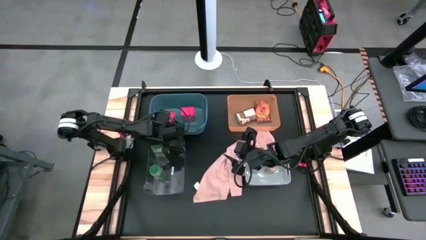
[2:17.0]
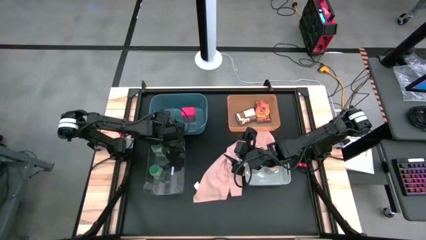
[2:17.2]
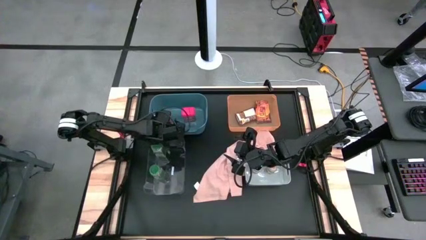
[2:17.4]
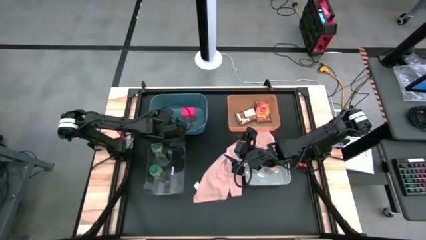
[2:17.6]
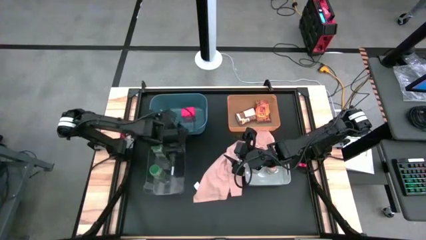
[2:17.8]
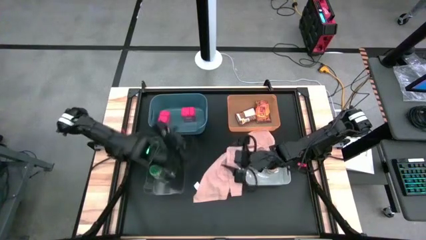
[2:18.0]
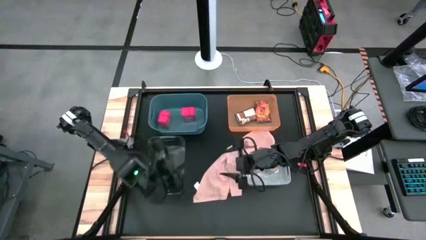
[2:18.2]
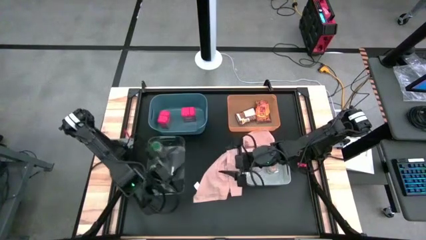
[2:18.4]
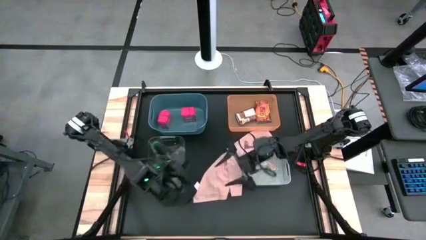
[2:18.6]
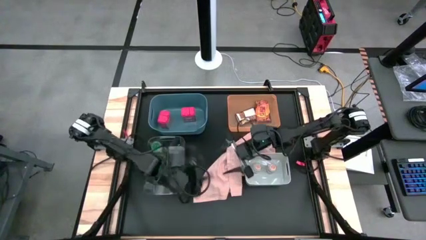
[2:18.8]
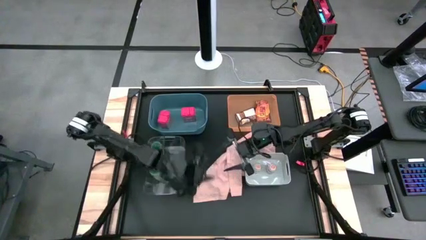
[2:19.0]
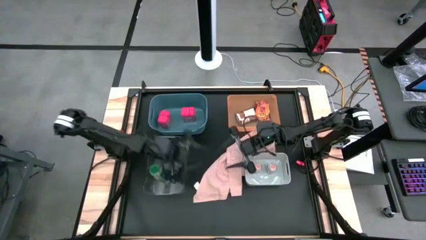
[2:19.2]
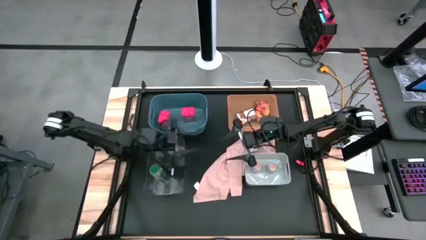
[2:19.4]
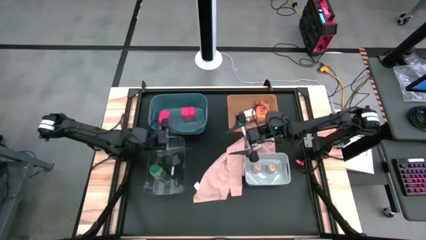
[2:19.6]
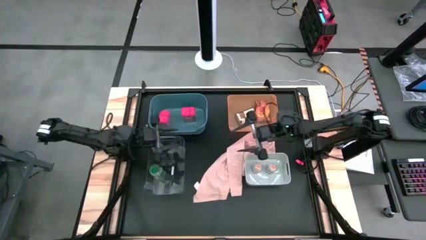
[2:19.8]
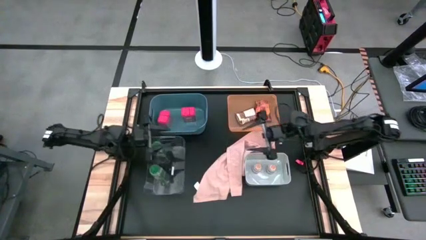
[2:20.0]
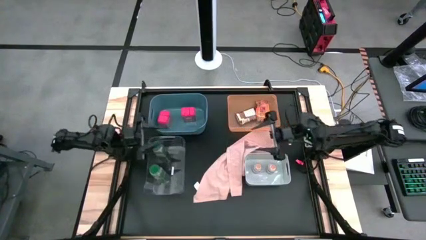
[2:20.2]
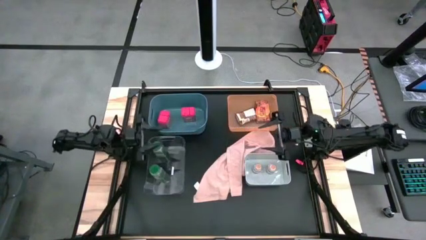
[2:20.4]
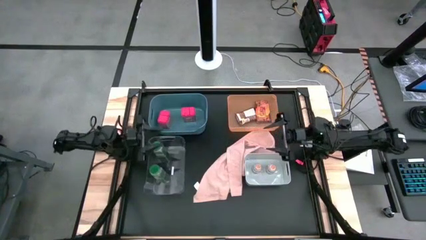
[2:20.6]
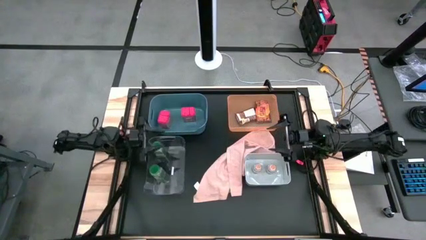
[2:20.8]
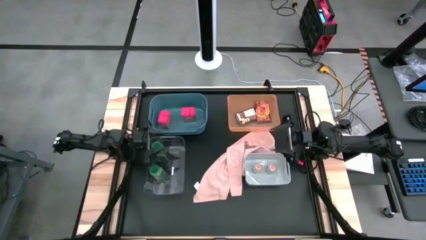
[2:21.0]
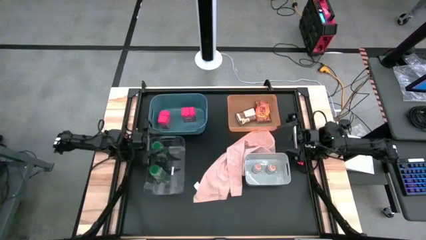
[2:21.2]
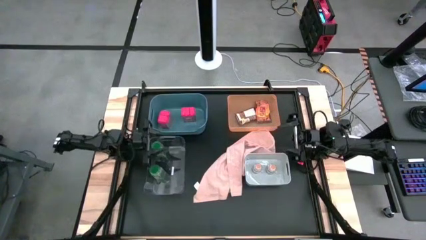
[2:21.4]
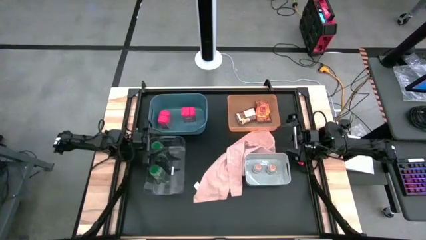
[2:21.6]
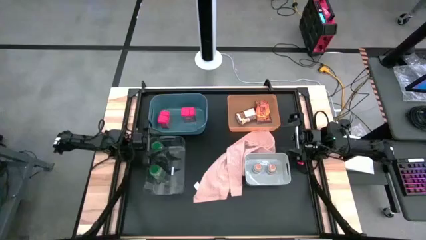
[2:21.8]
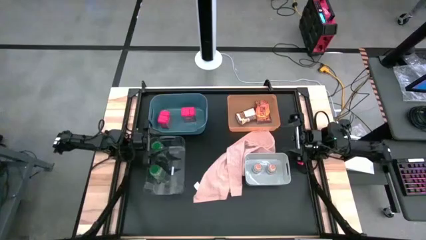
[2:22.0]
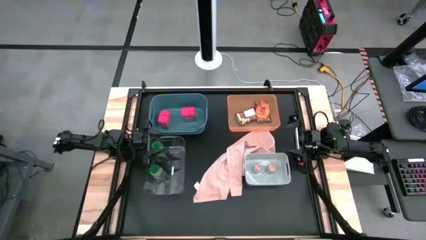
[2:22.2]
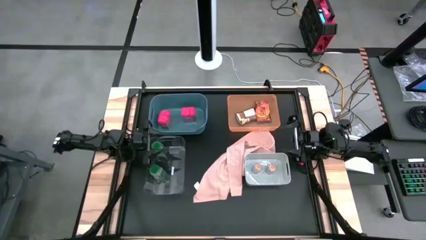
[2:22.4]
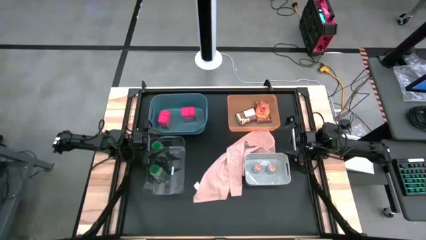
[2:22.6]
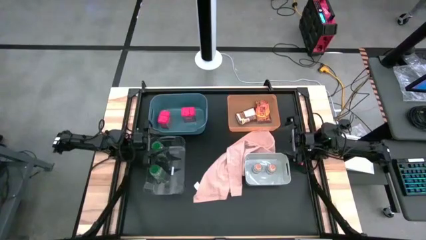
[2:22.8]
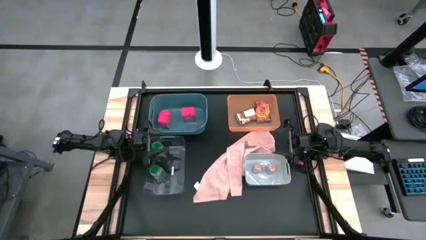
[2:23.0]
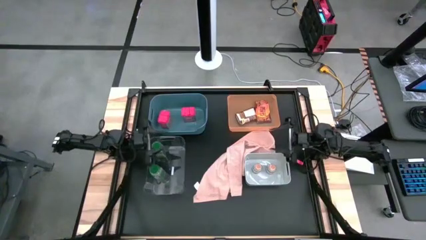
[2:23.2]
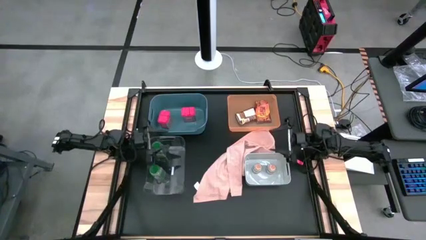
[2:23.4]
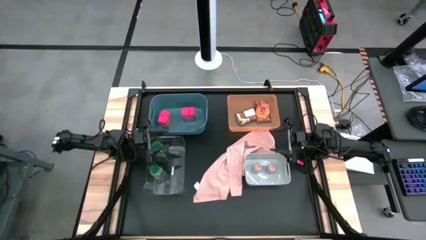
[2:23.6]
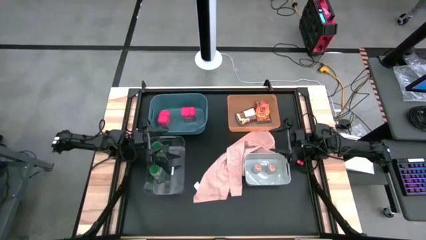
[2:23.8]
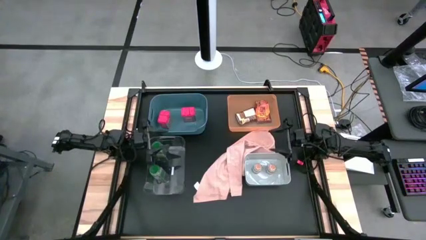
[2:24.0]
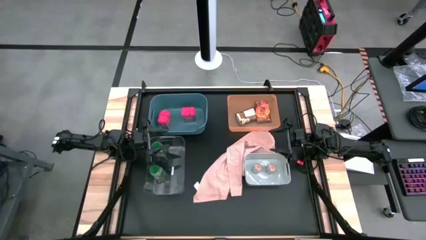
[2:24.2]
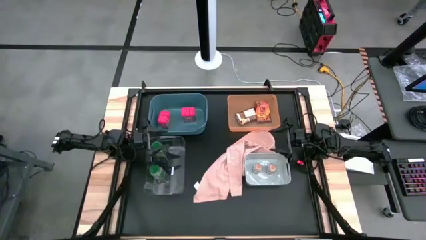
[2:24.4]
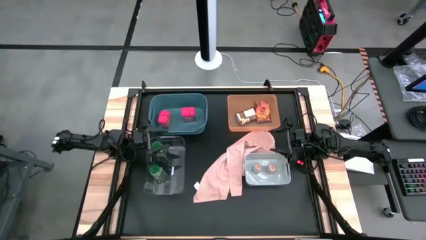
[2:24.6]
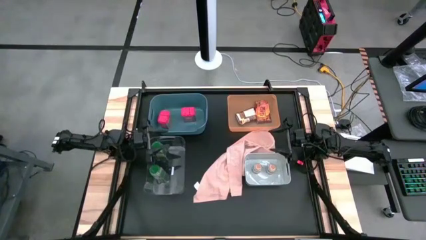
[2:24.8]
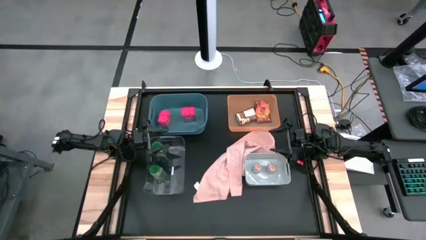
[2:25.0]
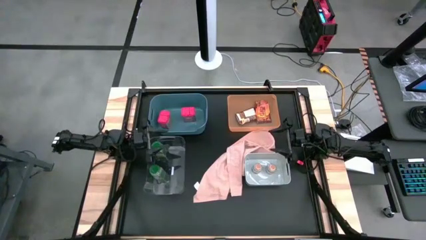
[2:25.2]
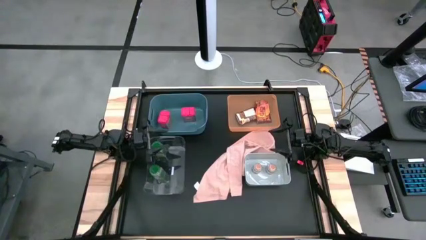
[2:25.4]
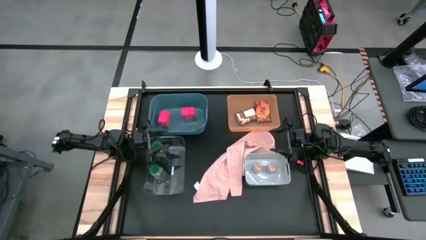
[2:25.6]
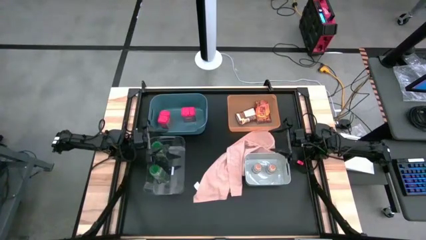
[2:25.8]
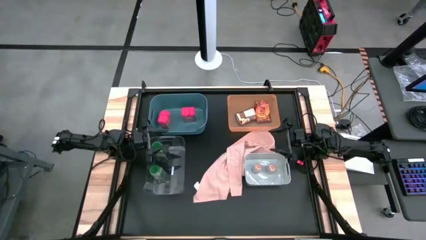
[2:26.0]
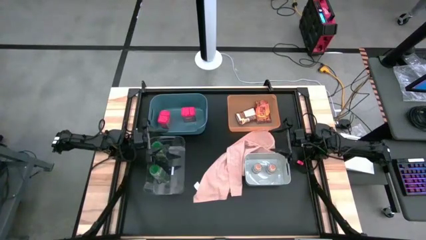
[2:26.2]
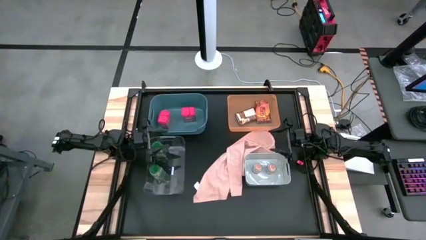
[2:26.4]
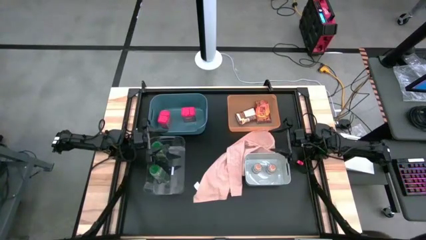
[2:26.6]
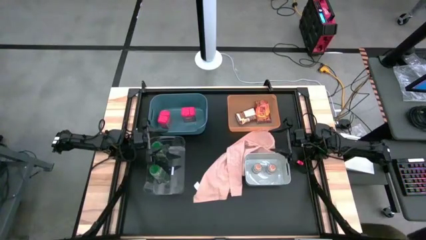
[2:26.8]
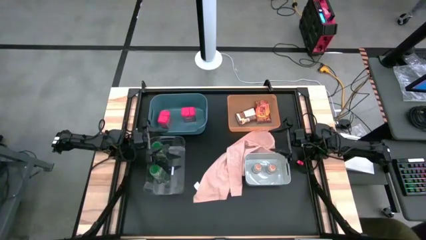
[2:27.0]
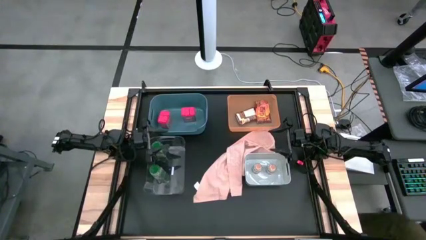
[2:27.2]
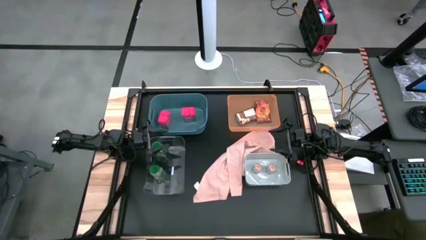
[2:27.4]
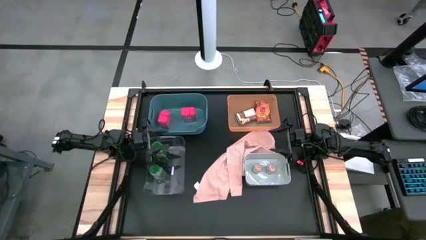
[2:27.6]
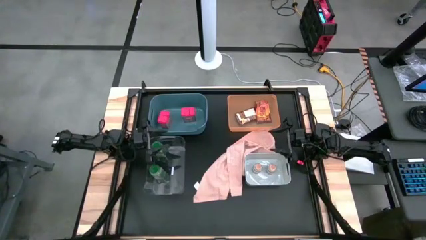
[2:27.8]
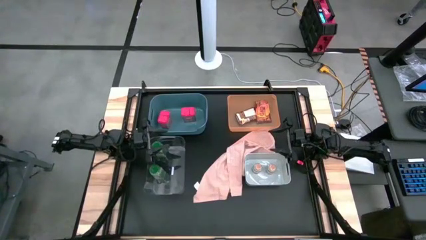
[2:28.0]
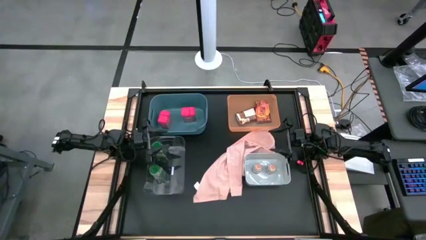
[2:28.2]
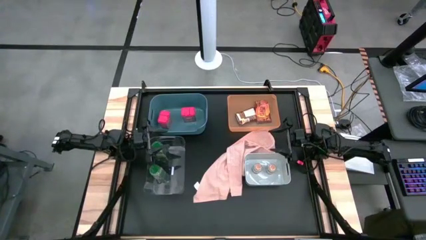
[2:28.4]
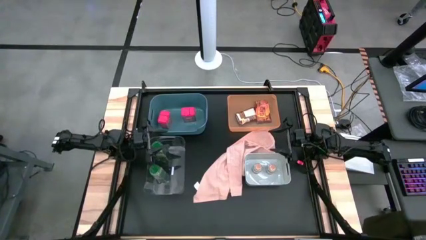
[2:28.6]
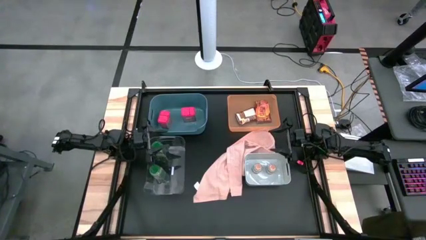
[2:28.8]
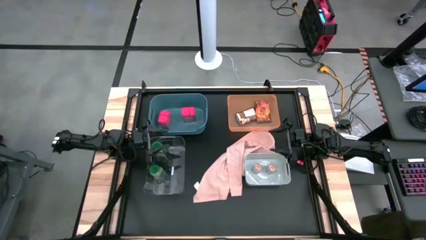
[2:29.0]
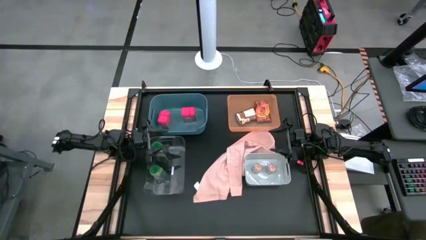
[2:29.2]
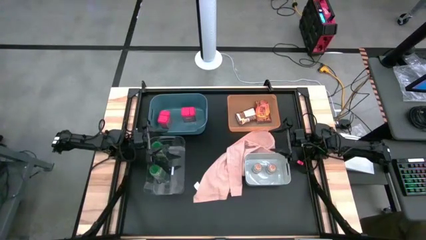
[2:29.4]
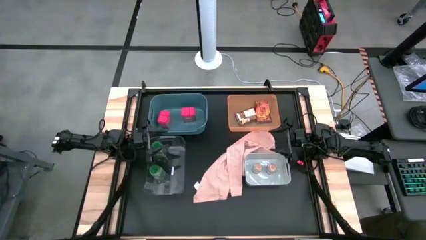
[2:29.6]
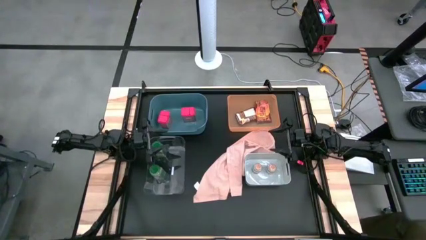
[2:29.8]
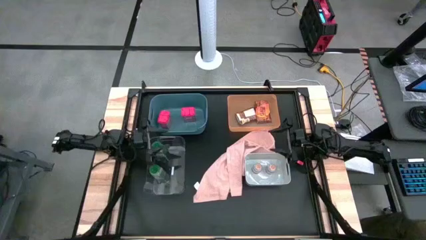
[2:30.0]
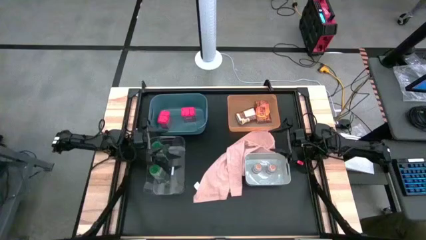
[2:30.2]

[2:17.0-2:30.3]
Task: Sort spices by type
Return to Home Position

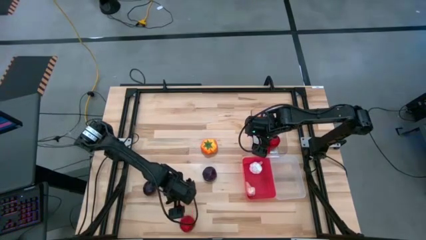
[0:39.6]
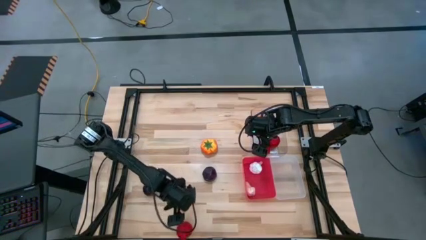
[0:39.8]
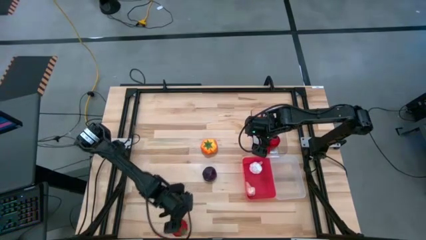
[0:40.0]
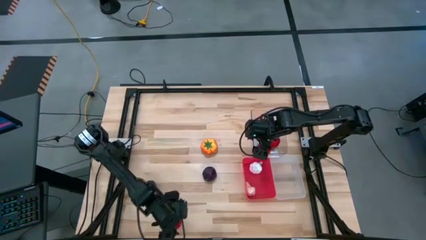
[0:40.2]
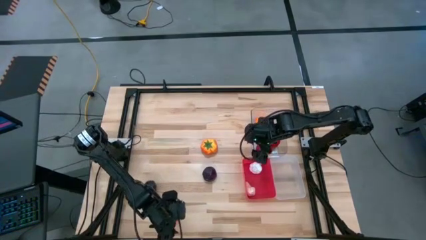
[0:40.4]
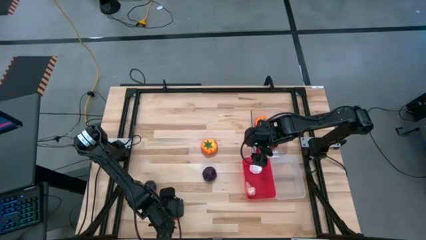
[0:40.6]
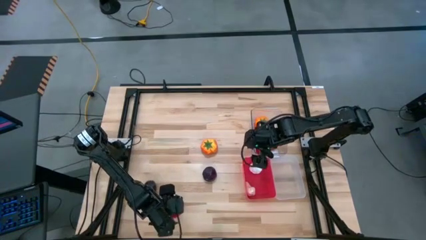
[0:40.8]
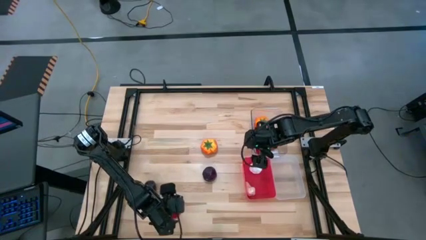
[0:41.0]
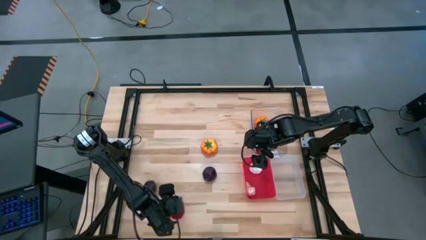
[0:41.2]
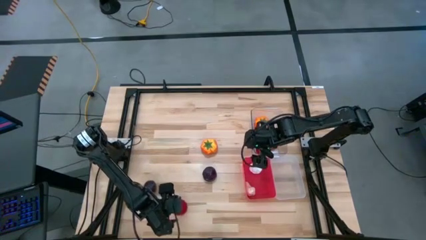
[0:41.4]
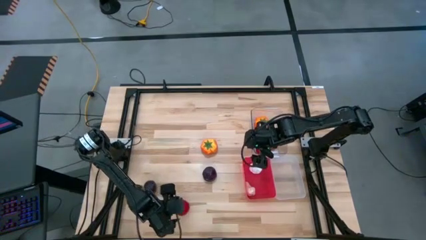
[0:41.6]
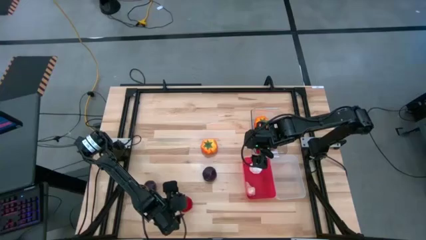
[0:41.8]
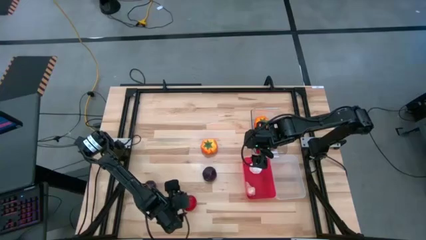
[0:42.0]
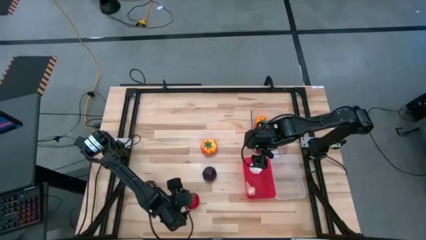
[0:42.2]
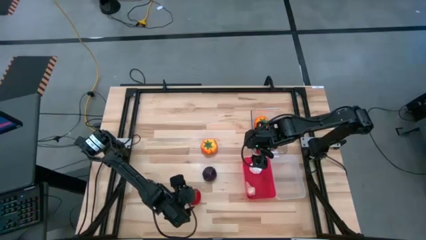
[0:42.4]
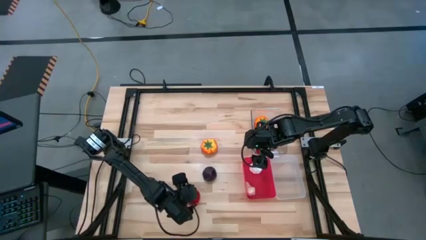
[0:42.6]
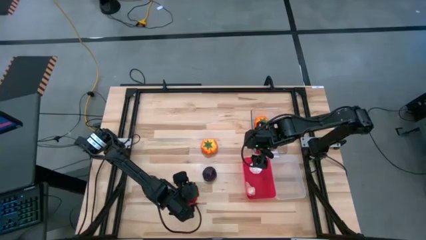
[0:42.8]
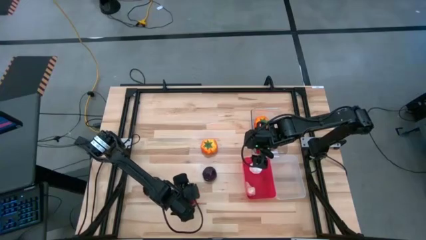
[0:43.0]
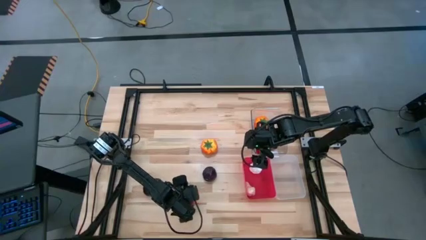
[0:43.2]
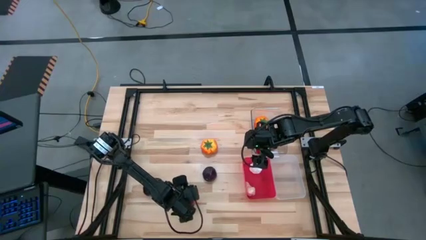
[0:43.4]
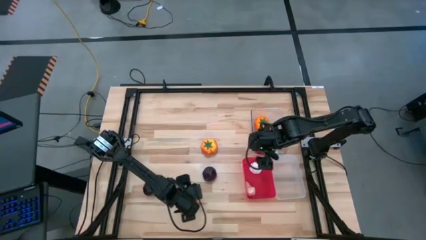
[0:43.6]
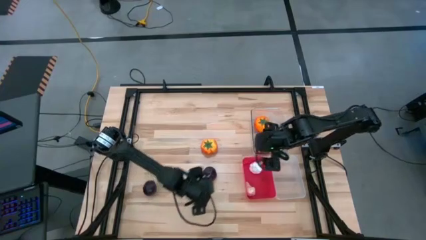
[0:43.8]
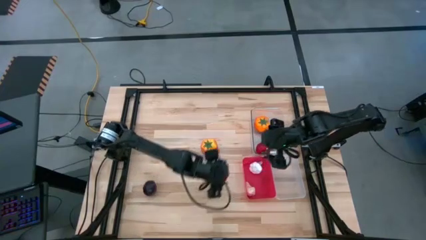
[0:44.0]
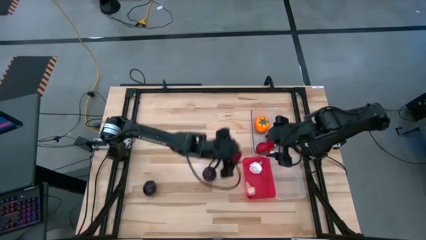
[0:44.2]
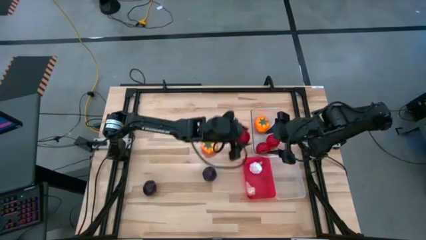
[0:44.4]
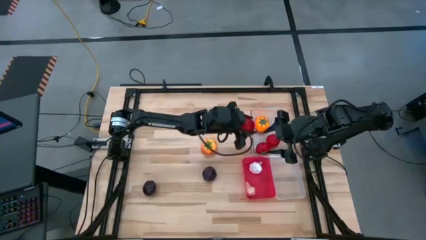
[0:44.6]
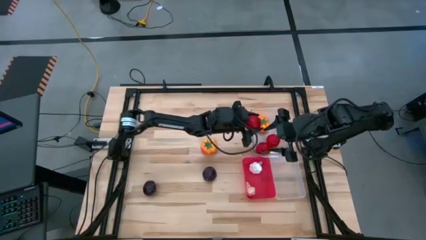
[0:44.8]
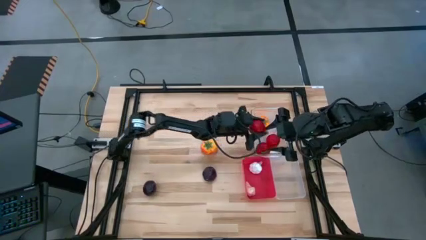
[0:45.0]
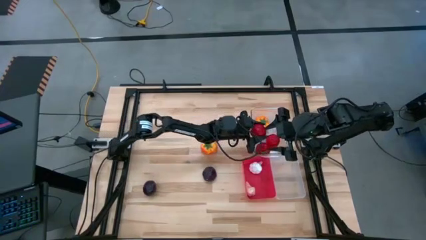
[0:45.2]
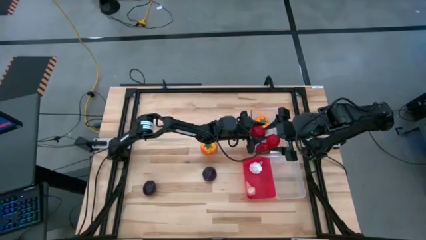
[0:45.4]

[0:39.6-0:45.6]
Task: Sort produce into baskets
Put the red tomato into the top transparent bin
